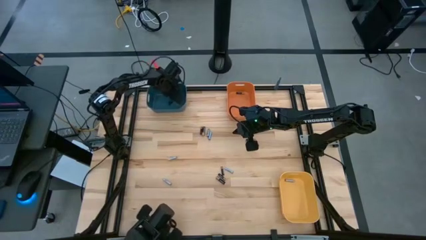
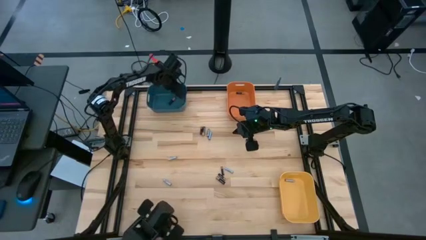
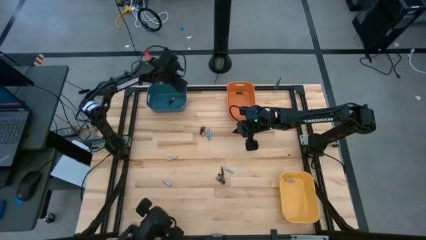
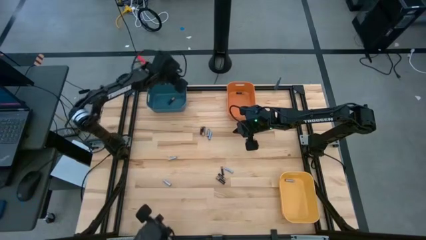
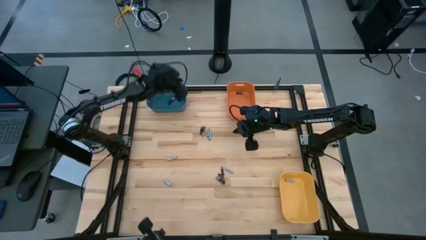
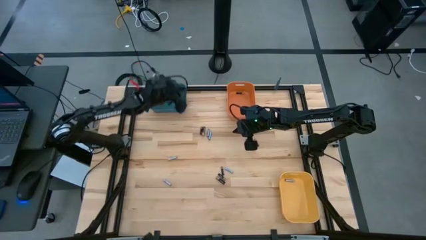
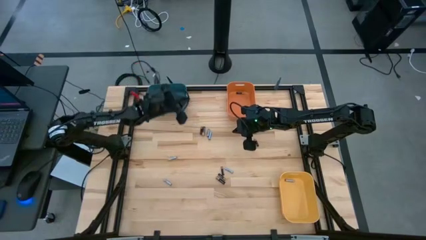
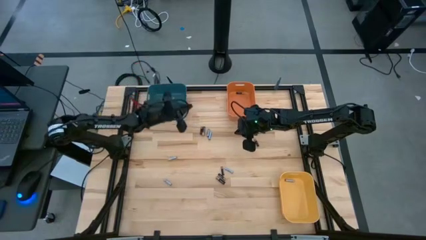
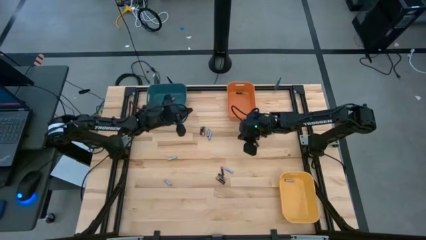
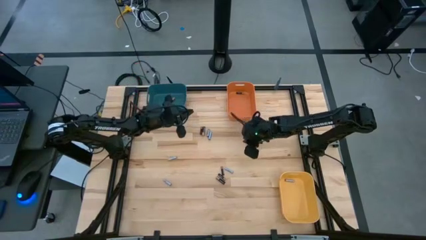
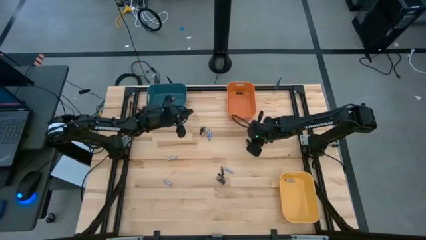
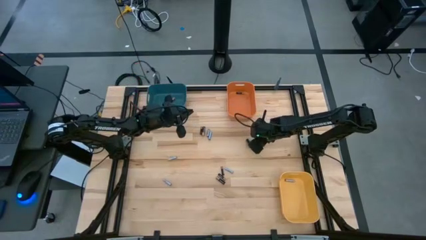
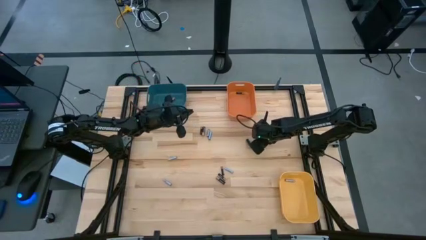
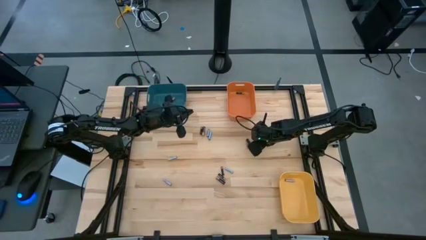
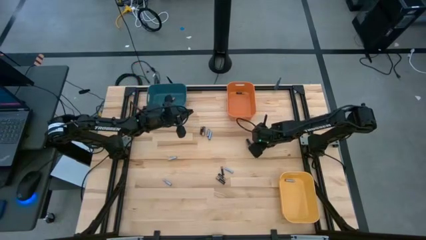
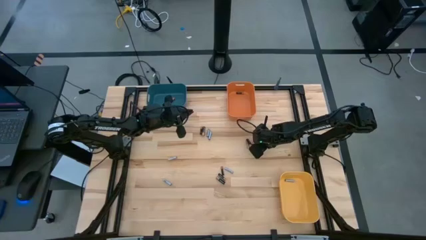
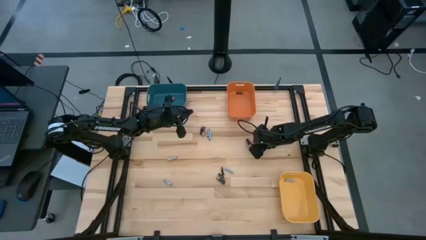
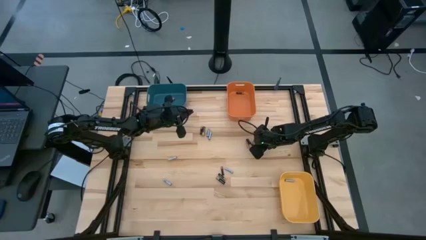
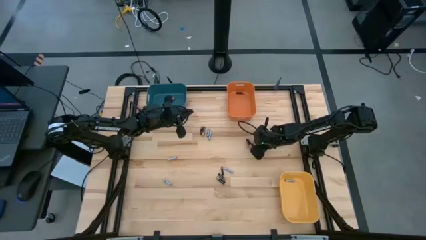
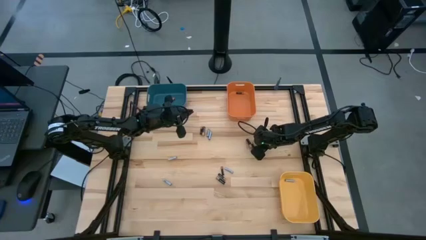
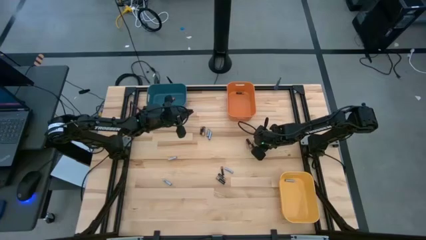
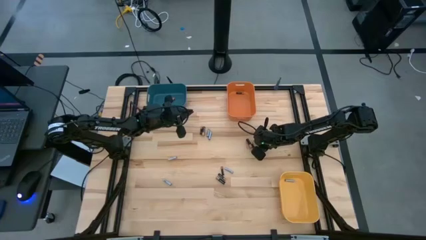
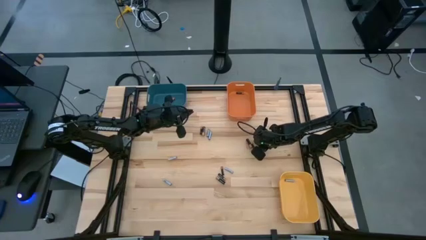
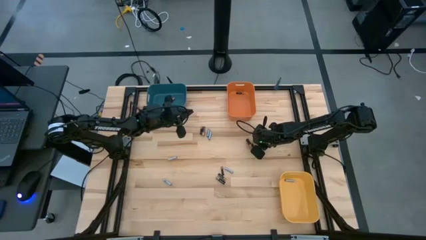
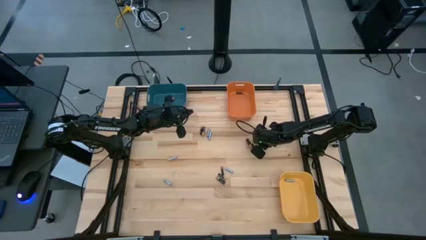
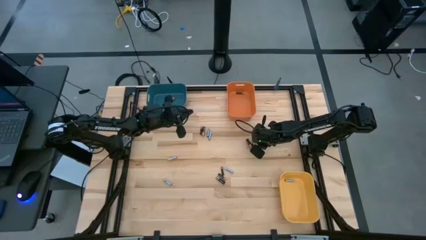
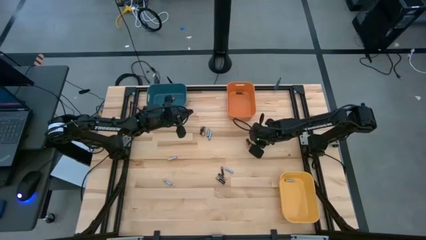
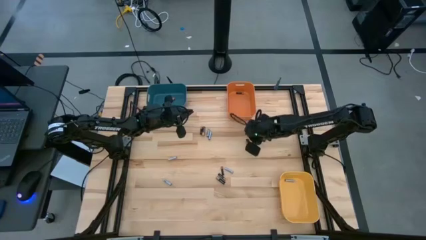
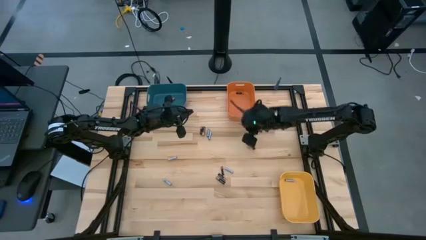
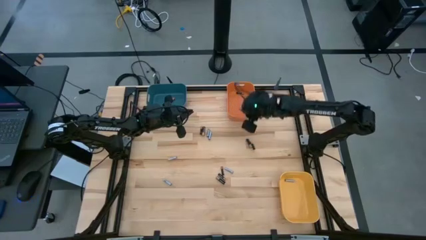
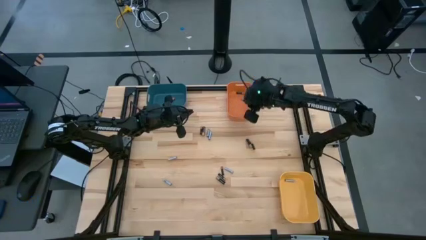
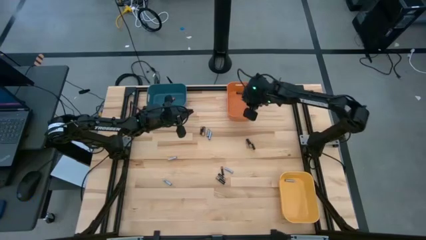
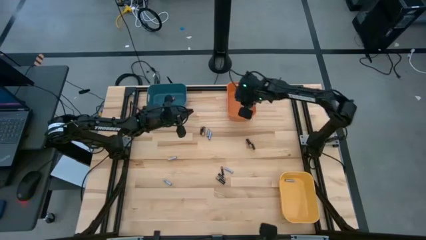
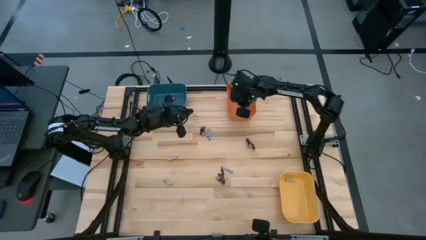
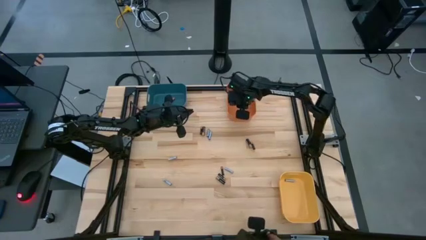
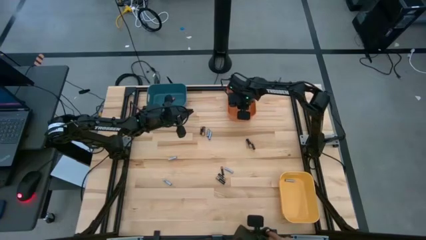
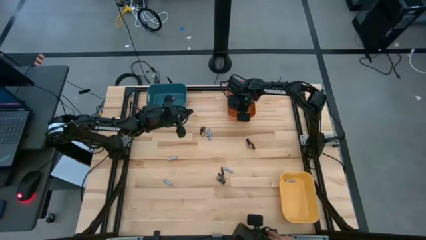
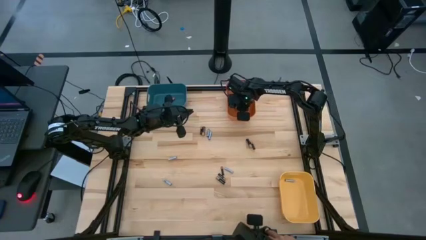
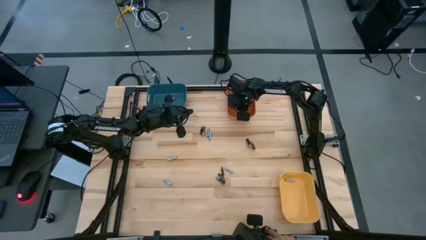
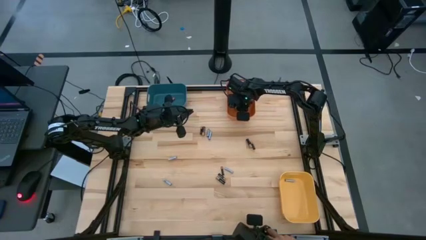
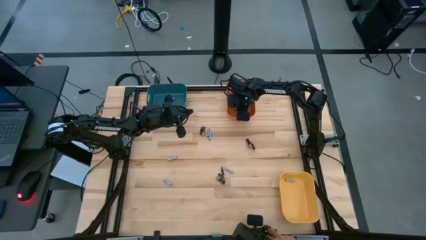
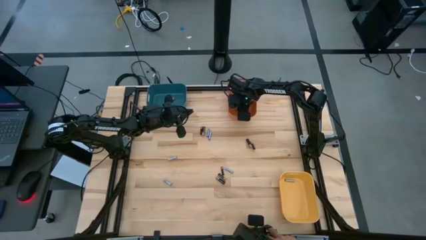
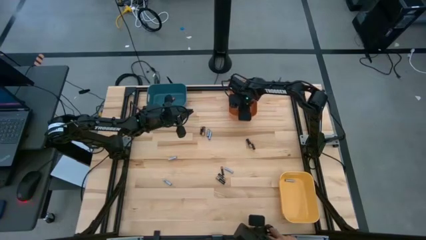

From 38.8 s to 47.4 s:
Task: Sort batteries
Put the small black battery into the orange bin
